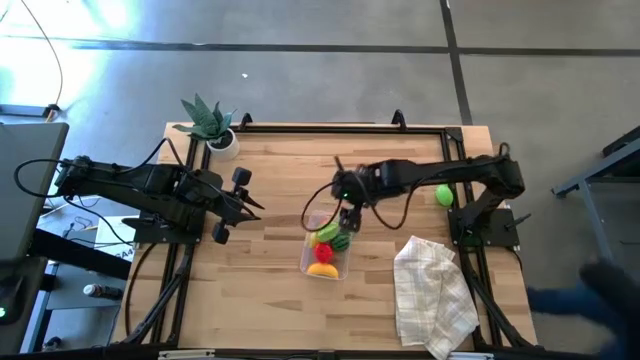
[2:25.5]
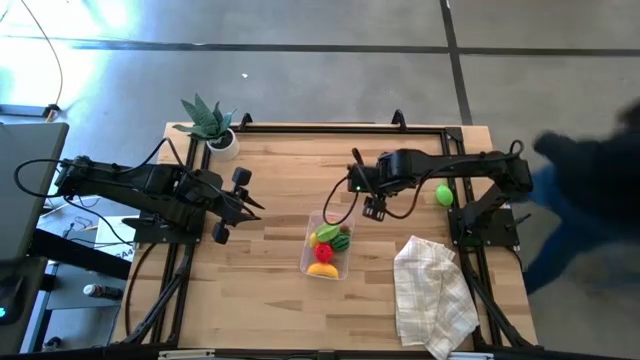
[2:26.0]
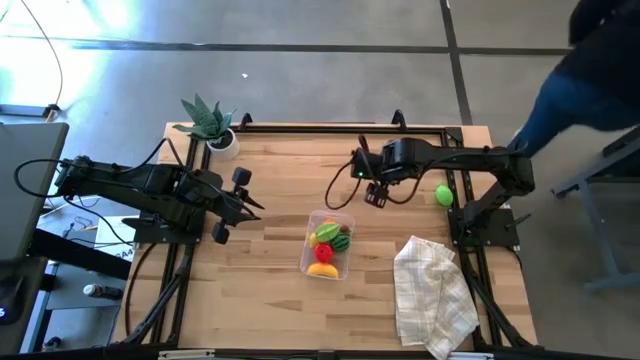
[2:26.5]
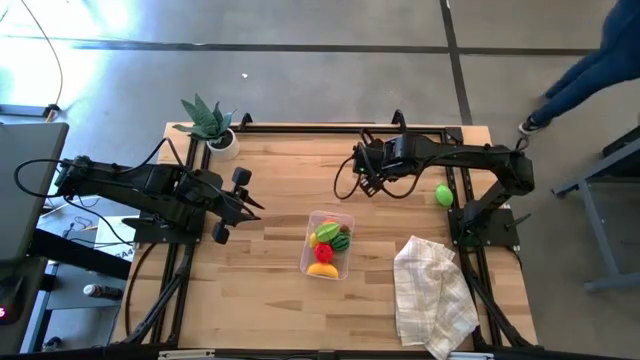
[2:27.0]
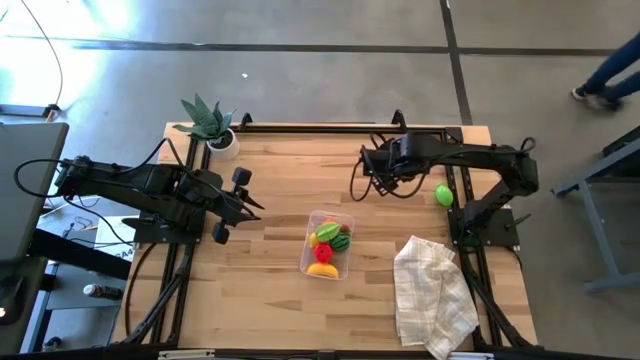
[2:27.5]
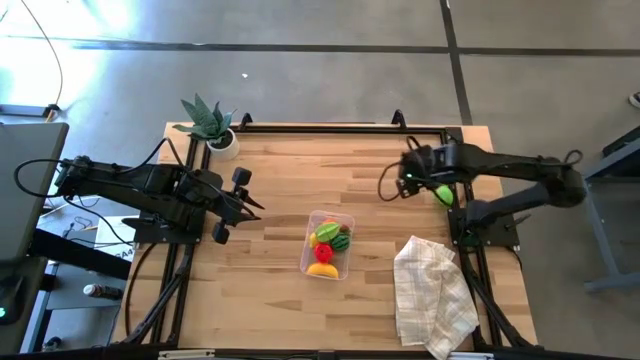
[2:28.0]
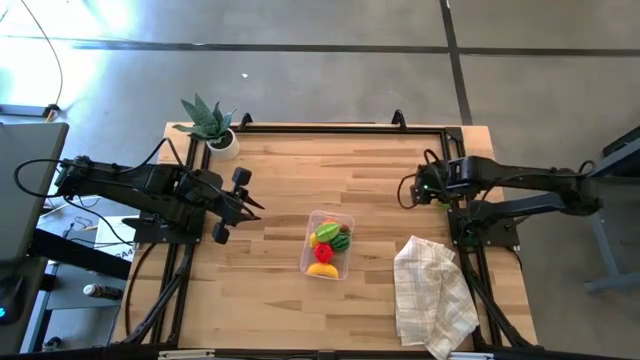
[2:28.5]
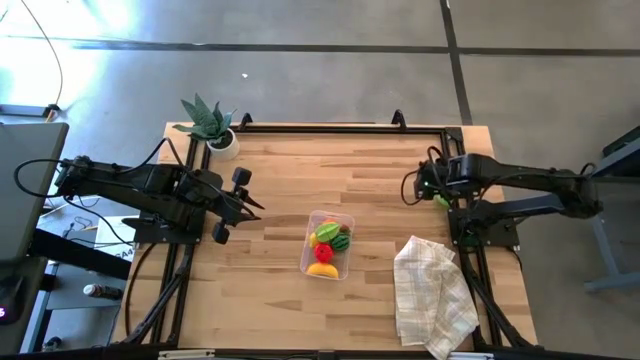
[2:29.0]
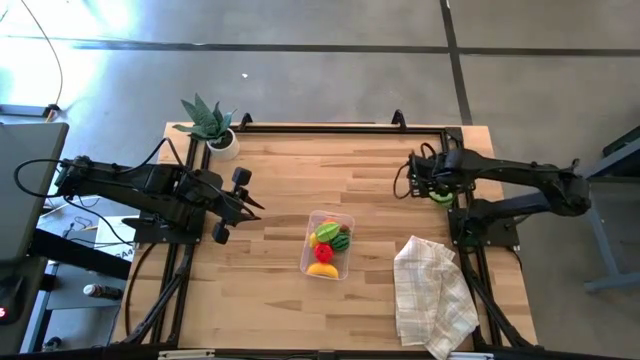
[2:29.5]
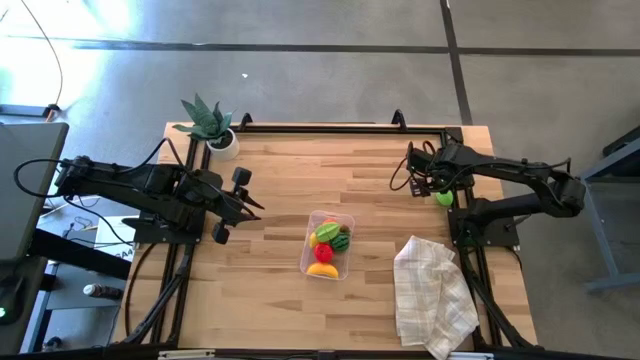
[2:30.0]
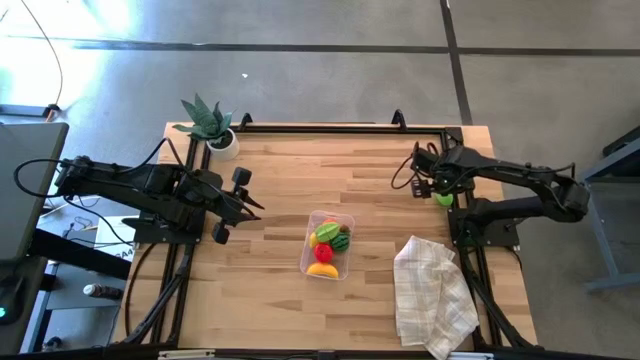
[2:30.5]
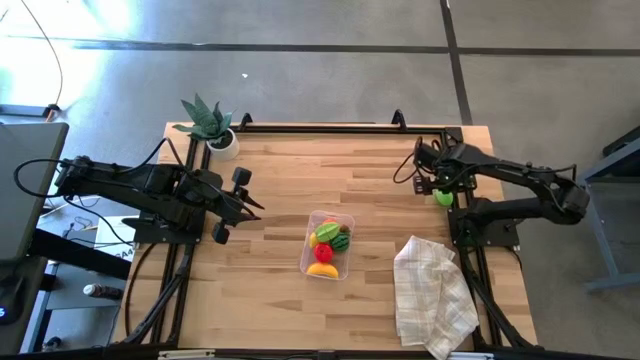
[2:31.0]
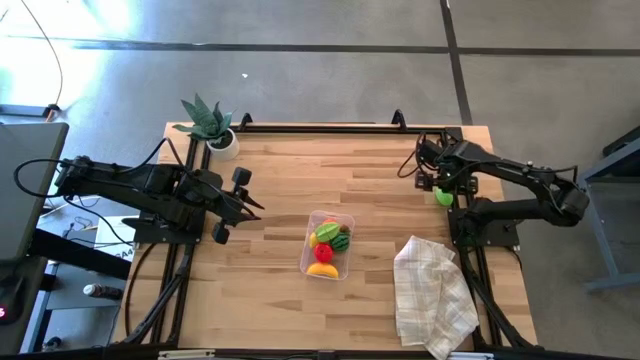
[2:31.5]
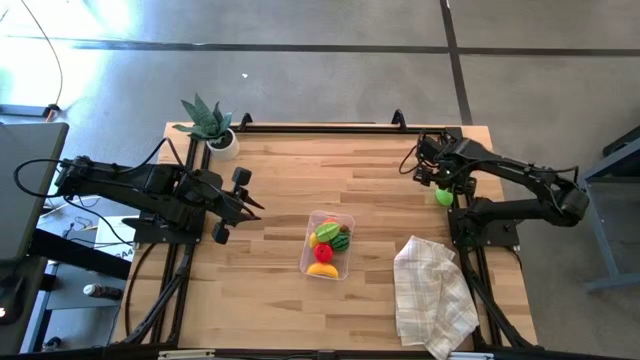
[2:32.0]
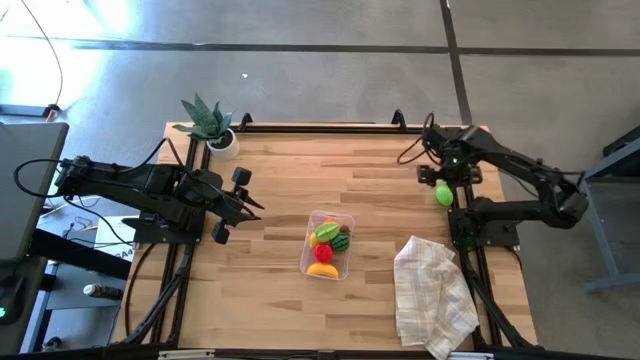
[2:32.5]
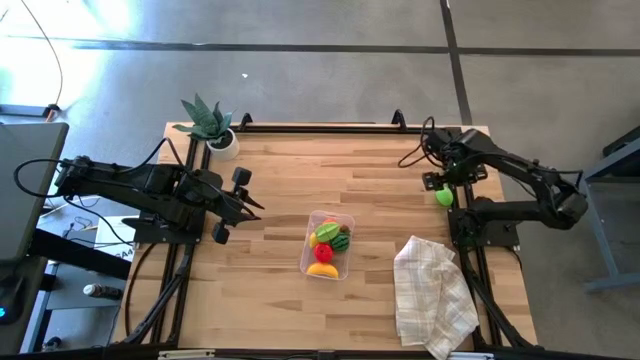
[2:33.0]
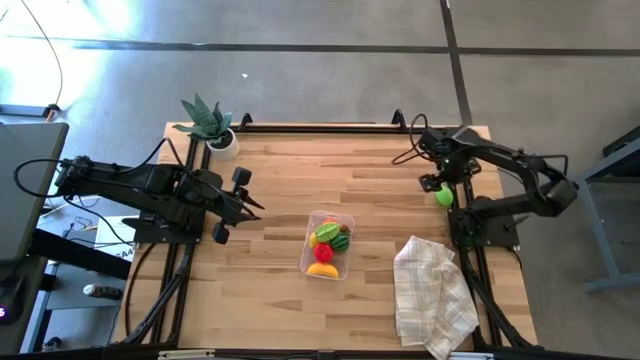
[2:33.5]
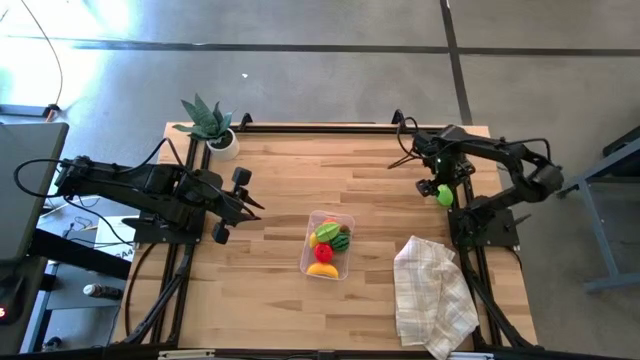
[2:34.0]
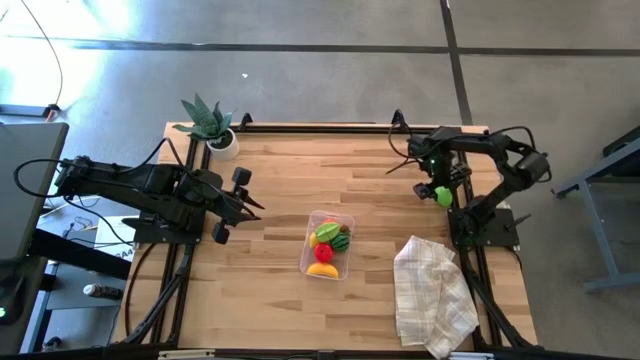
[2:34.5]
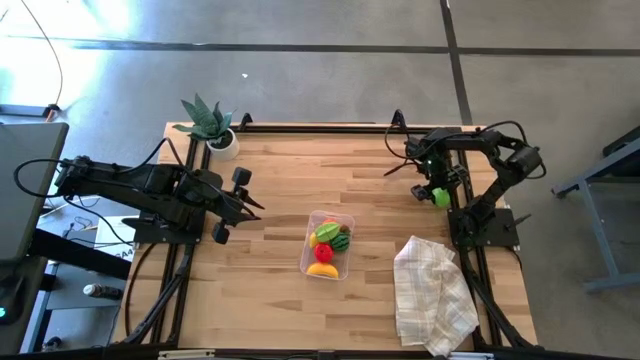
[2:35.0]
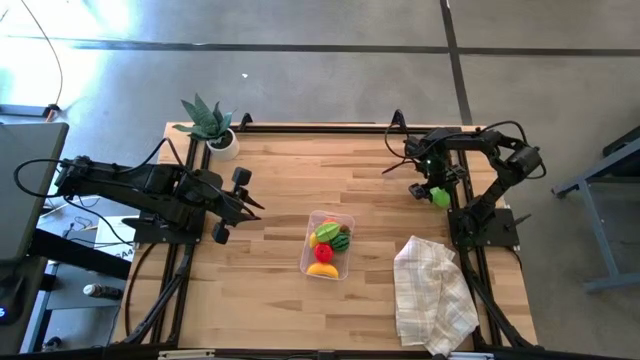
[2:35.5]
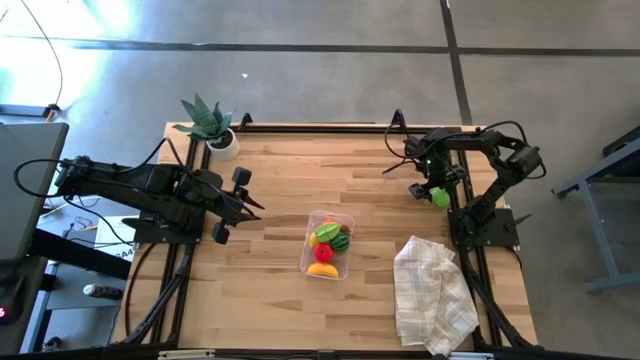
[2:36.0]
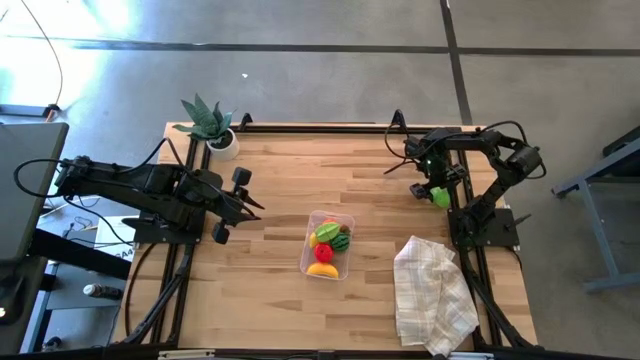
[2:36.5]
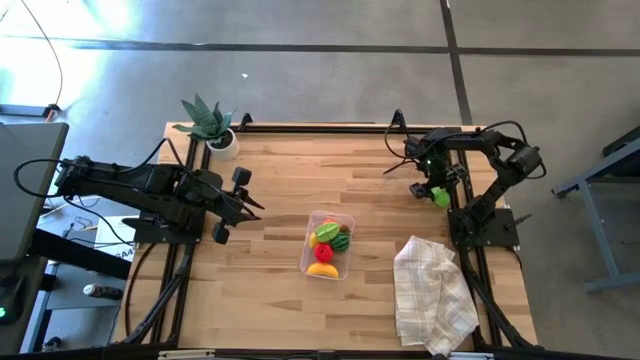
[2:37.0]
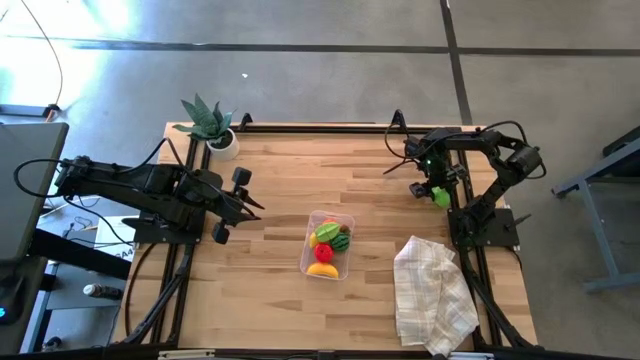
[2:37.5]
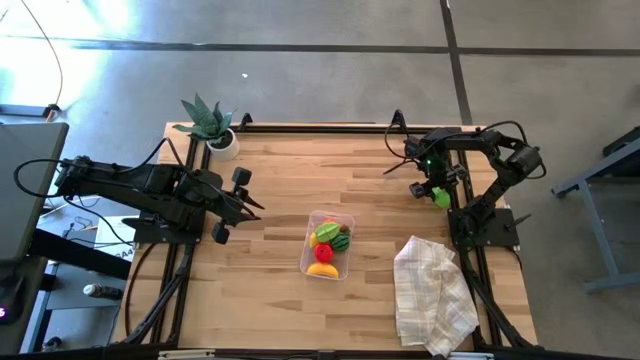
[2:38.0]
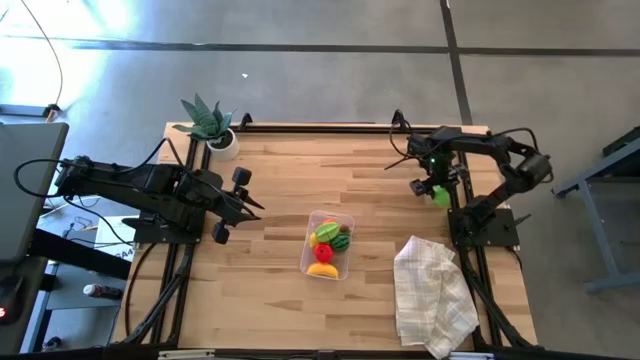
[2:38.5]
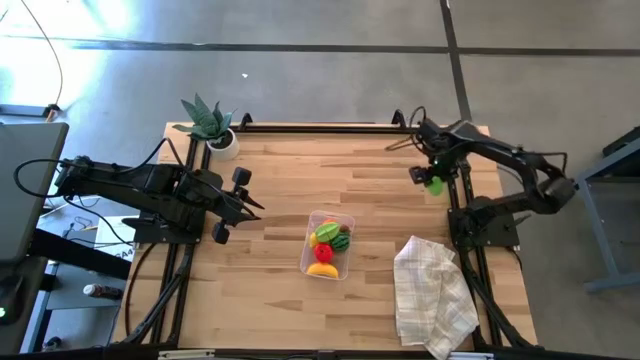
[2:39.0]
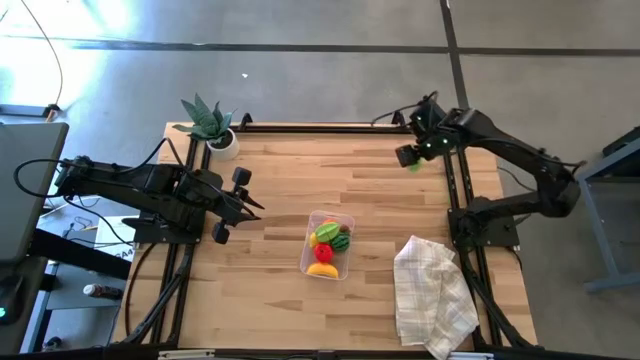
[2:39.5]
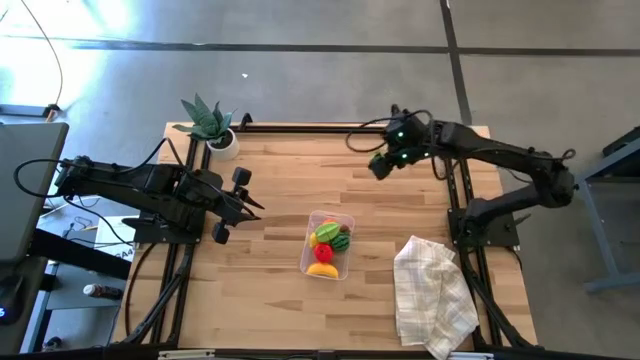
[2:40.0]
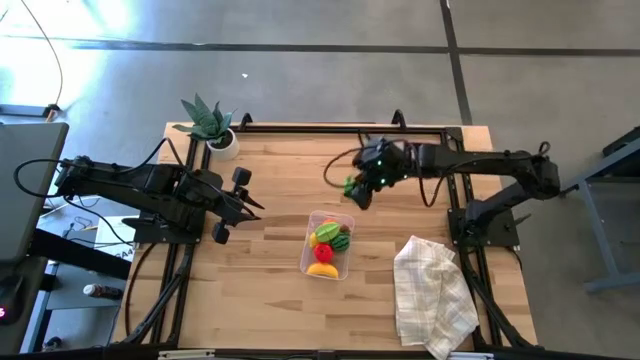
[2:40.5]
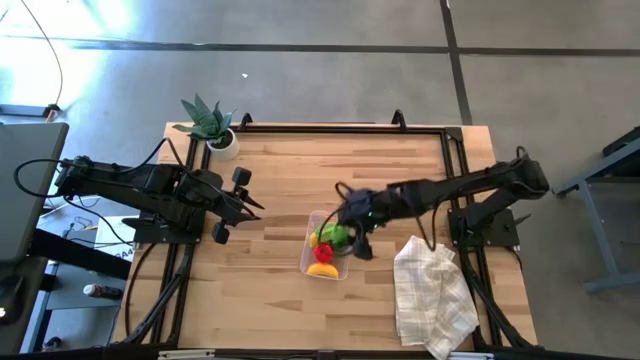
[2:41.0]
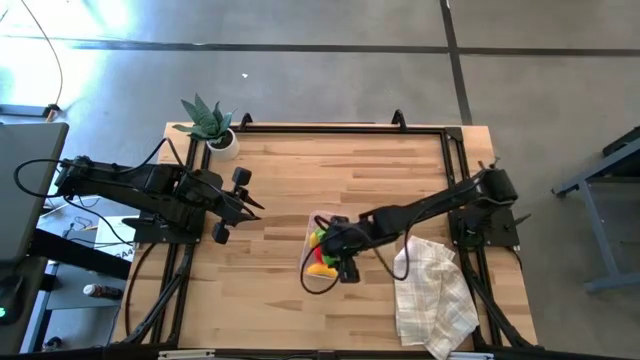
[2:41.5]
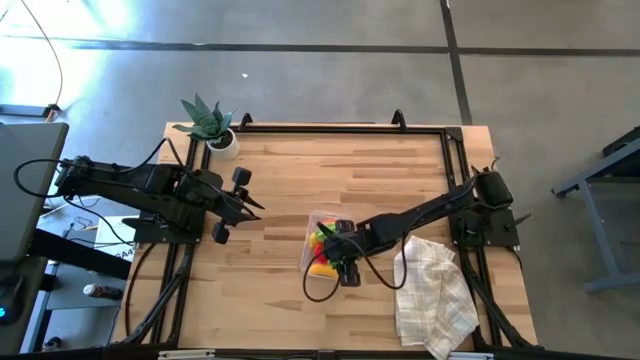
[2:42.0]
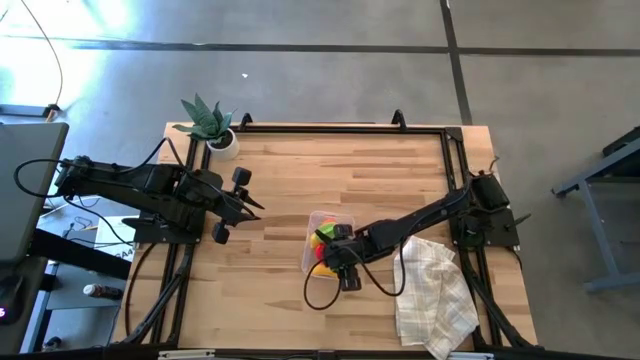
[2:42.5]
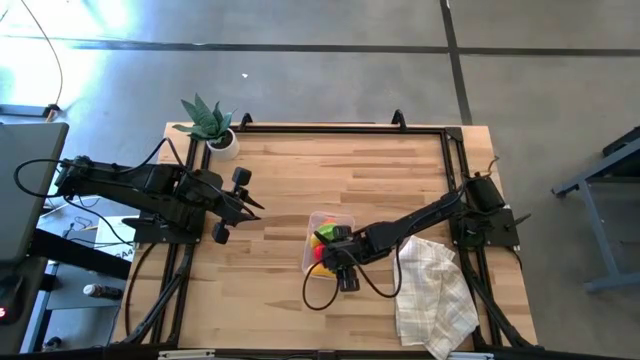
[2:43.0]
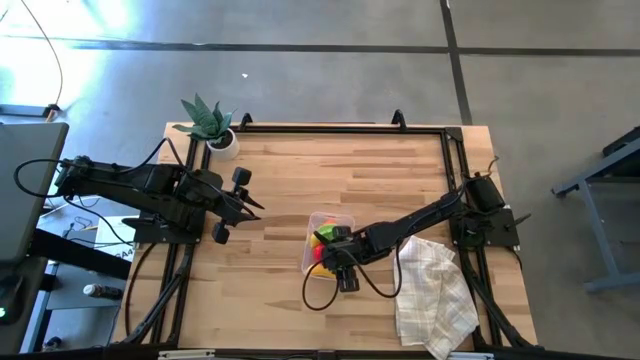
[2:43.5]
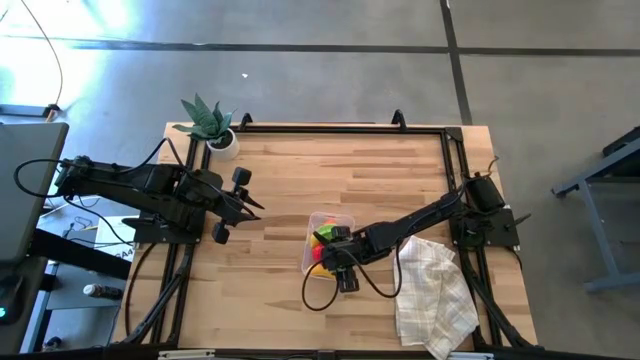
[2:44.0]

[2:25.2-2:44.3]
Task: Pick and placing Produce into tupperware
Put the melon into the transparent bin
